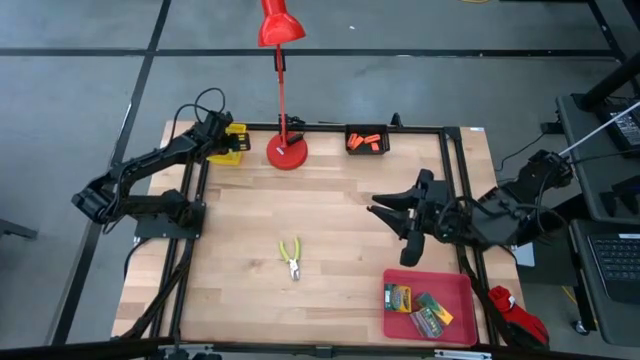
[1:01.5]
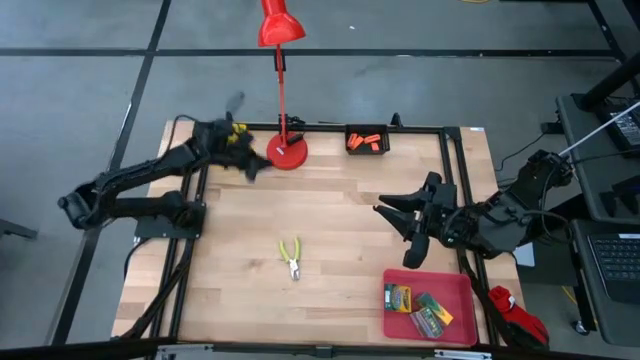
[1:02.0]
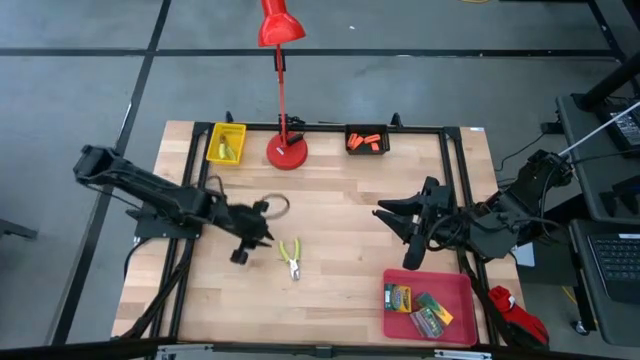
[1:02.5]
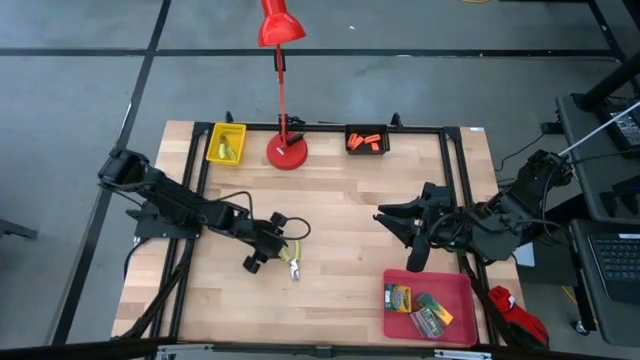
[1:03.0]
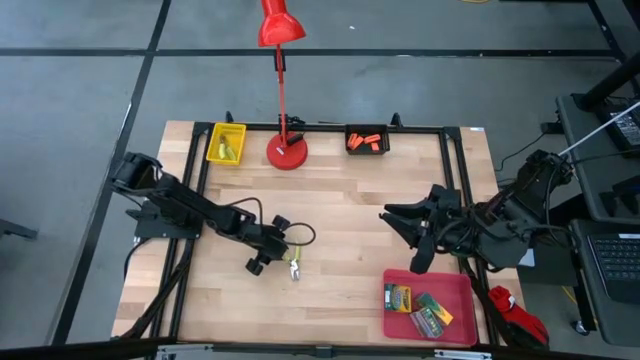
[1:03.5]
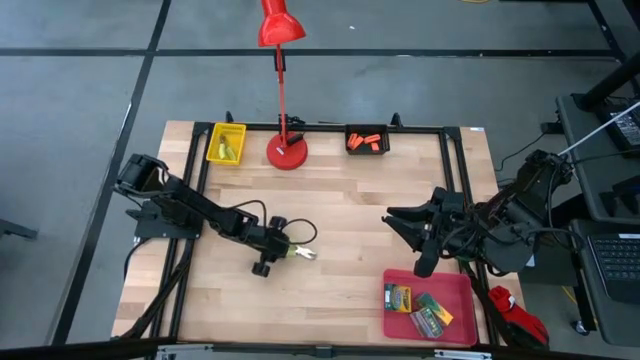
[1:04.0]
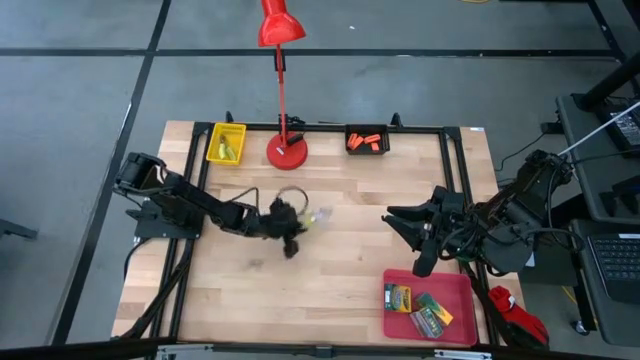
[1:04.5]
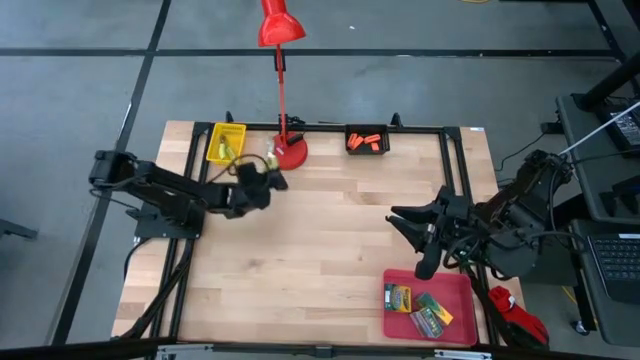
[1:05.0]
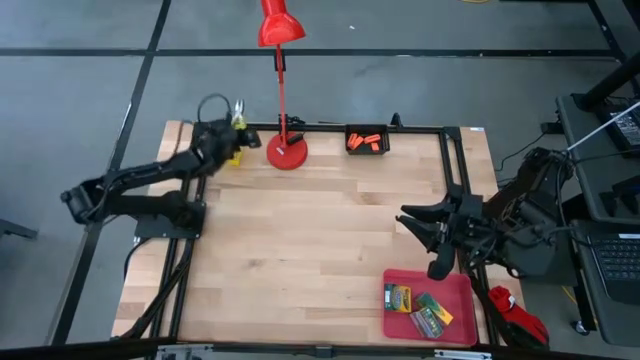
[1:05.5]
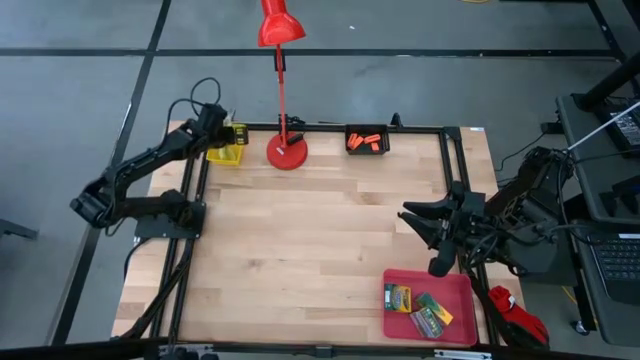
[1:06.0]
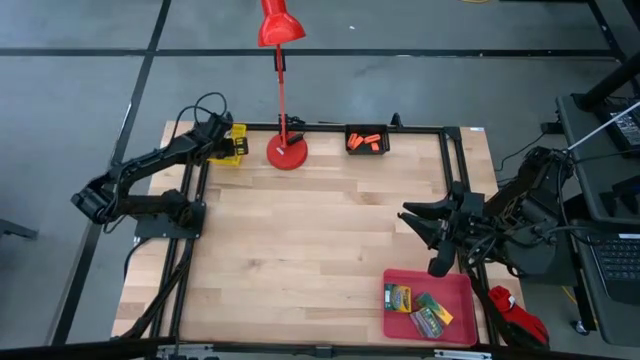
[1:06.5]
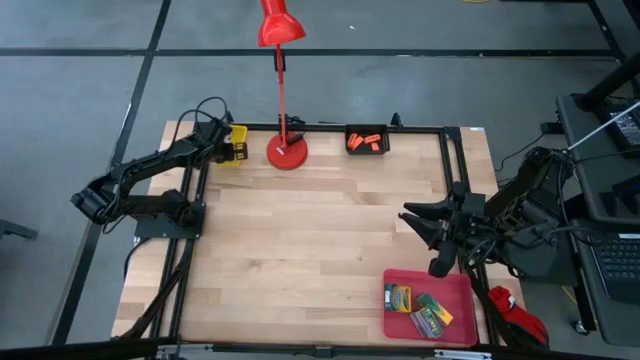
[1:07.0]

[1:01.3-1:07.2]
Task: Pick & Place School Supplies
Put the green hole punch into the yellow bin

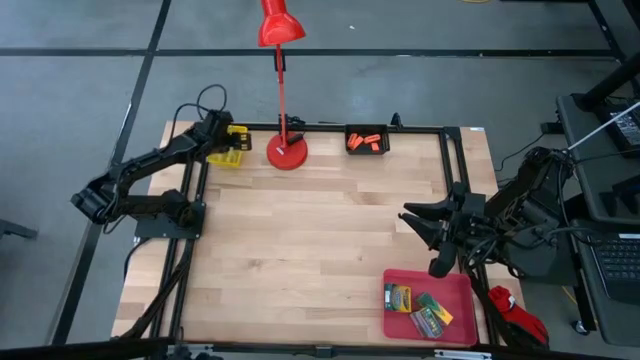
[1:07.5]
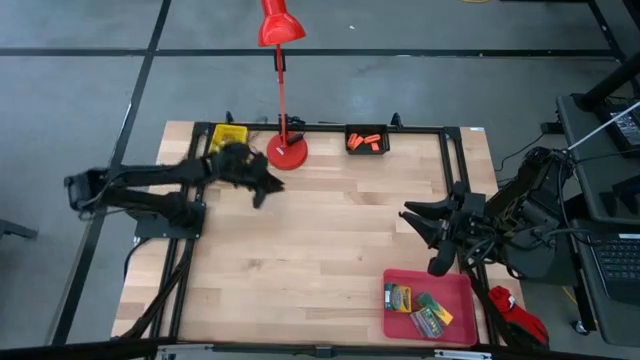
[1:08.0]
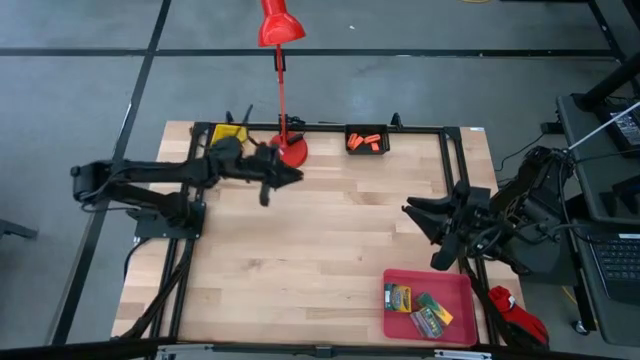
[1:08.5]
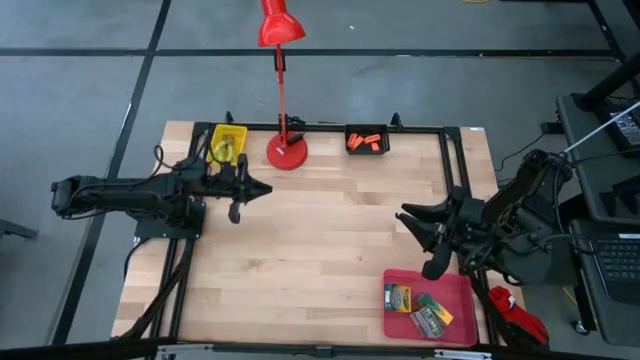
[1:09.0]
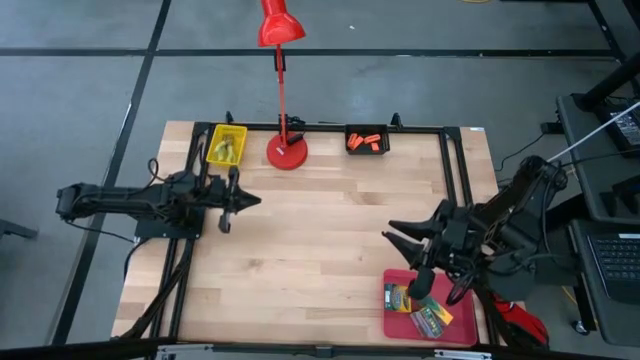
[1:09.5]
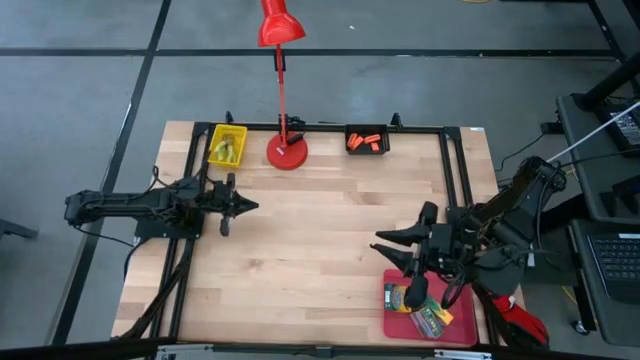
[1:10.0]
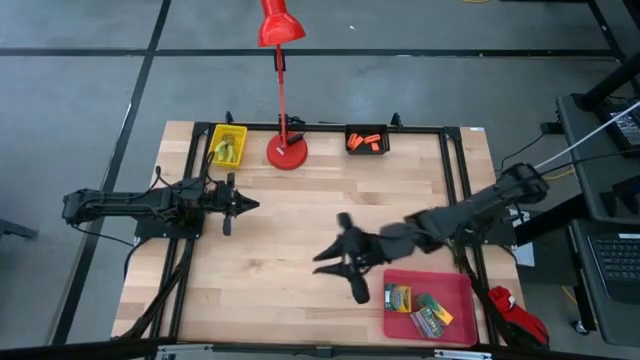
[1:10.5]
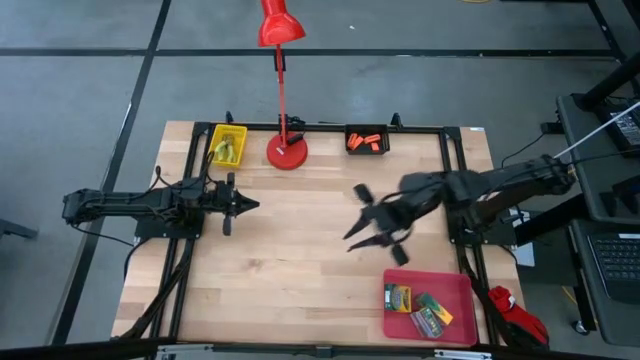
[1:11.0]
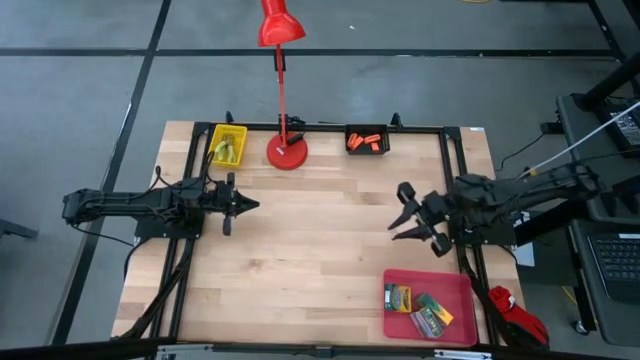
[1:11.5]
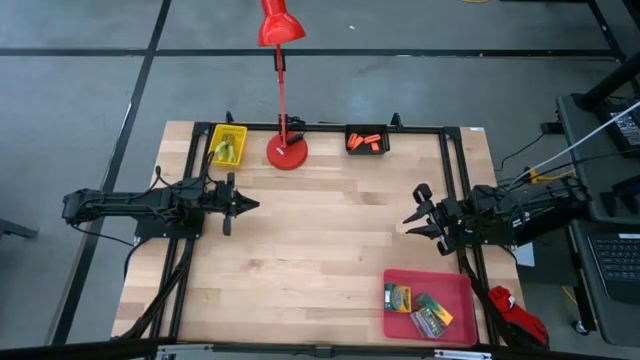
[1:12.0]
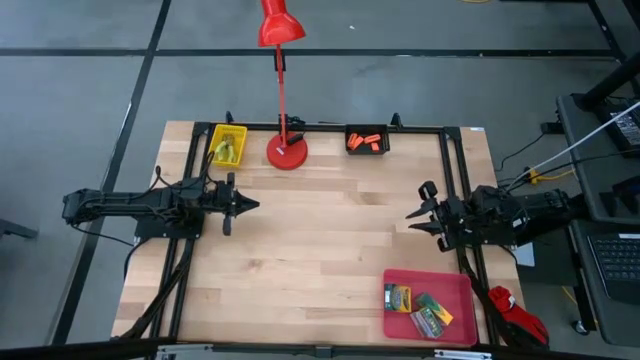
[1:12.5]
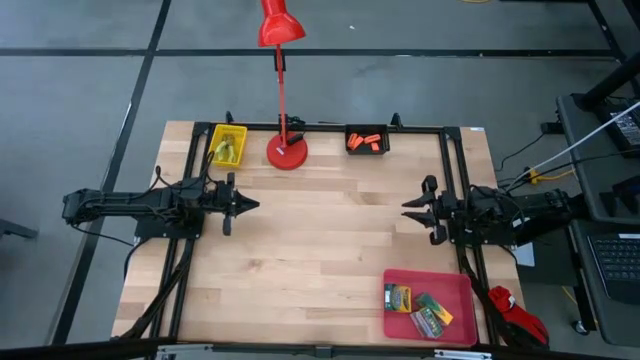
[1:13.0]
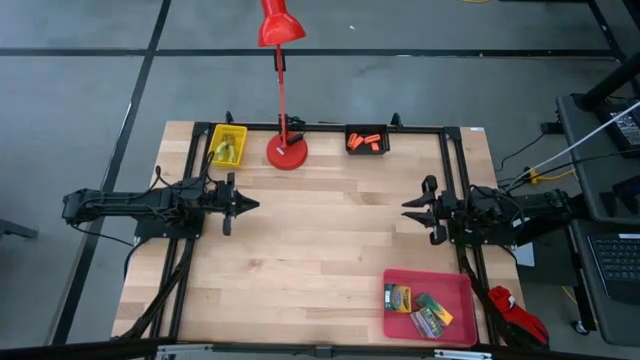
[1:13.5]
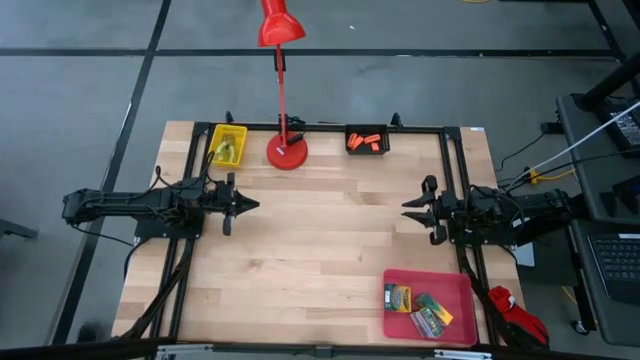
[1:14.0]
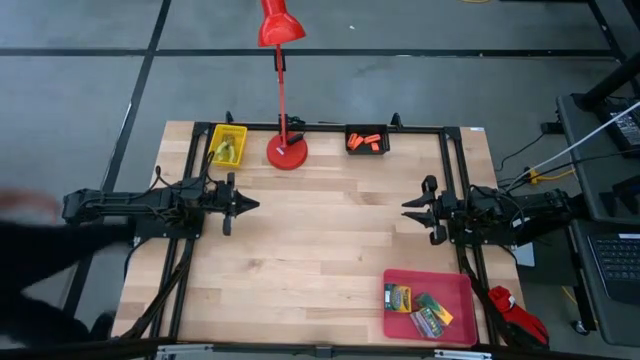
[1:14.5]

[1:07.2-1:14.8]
Return to Home Position

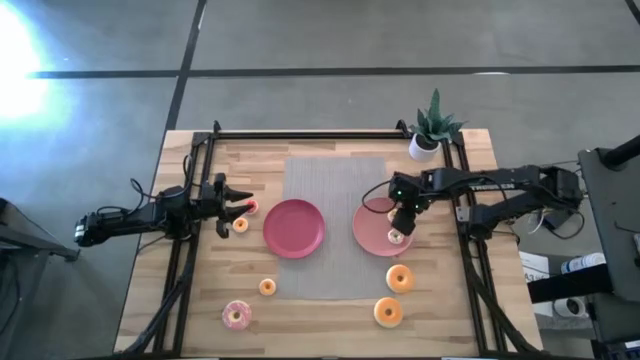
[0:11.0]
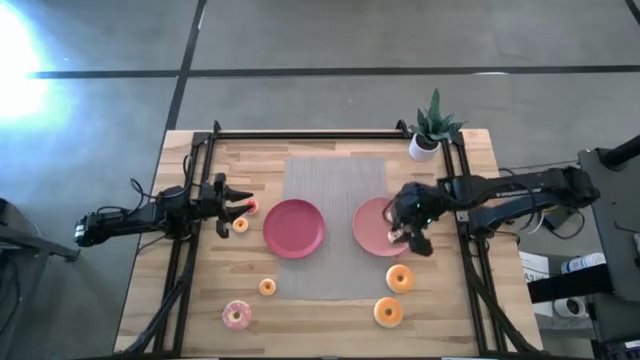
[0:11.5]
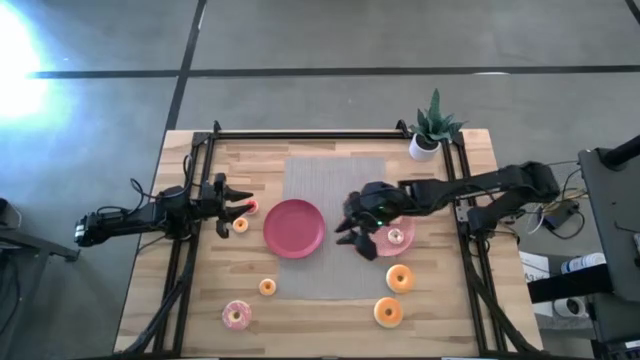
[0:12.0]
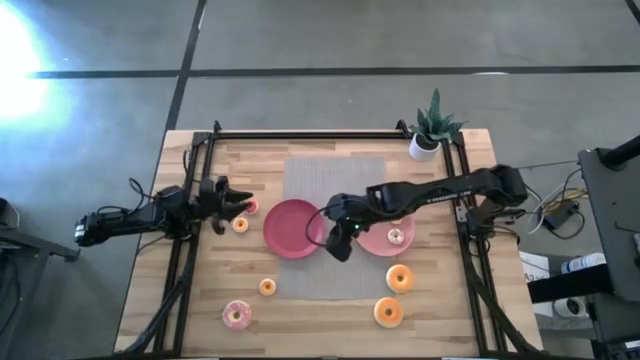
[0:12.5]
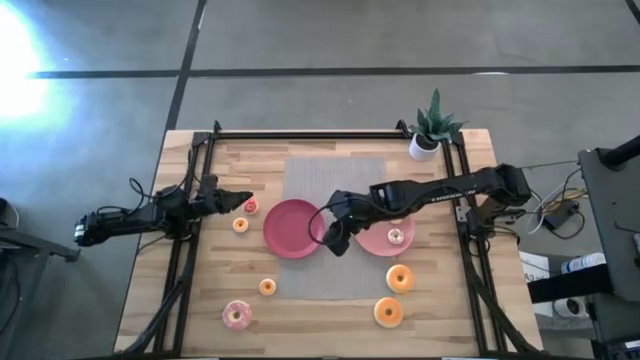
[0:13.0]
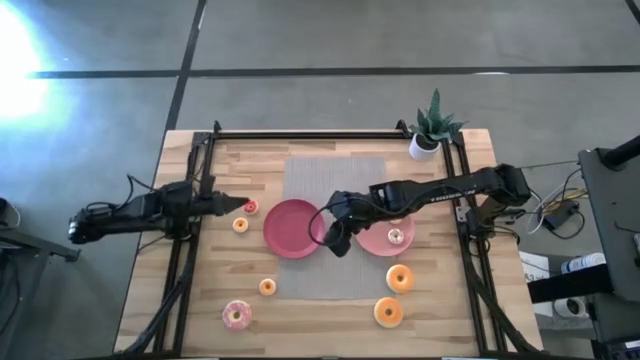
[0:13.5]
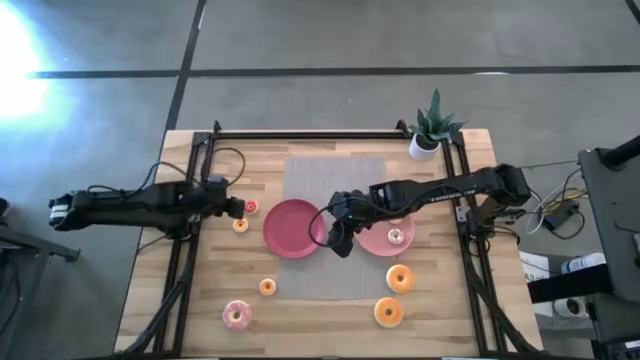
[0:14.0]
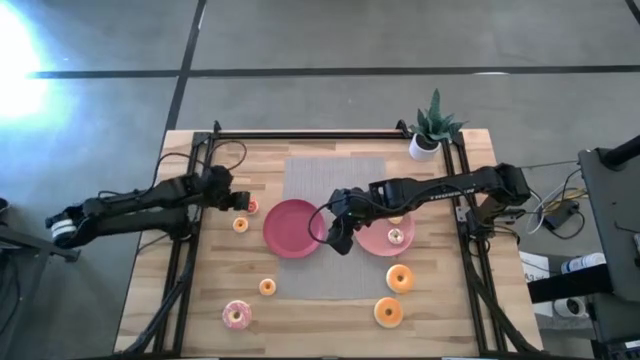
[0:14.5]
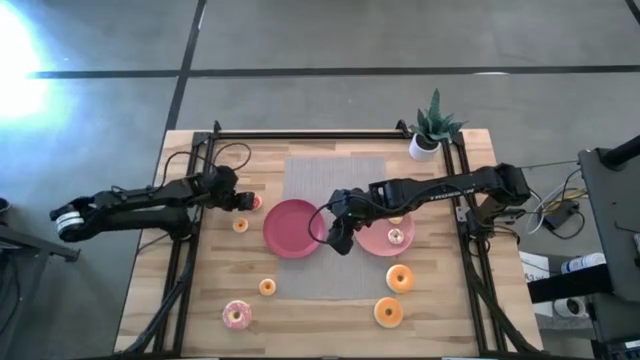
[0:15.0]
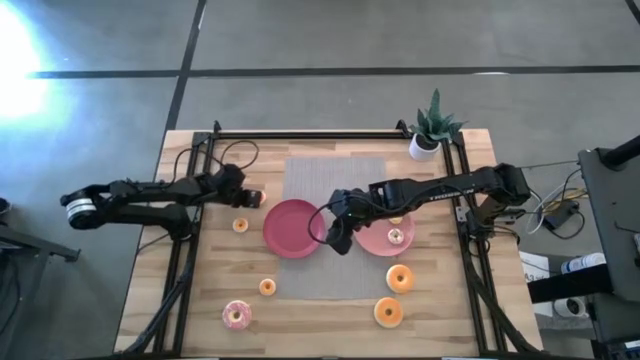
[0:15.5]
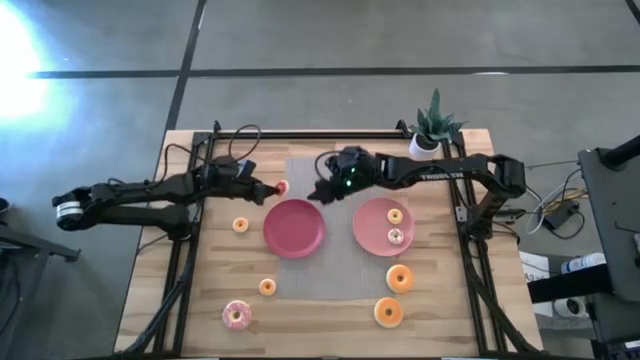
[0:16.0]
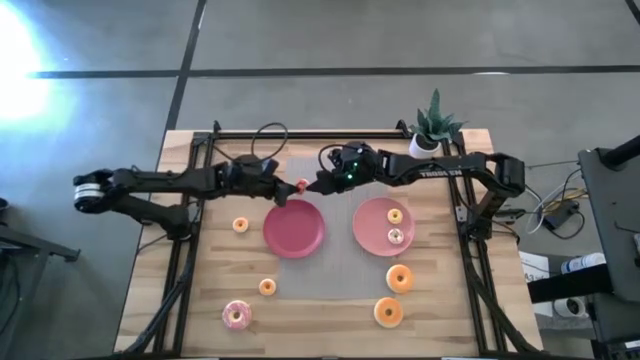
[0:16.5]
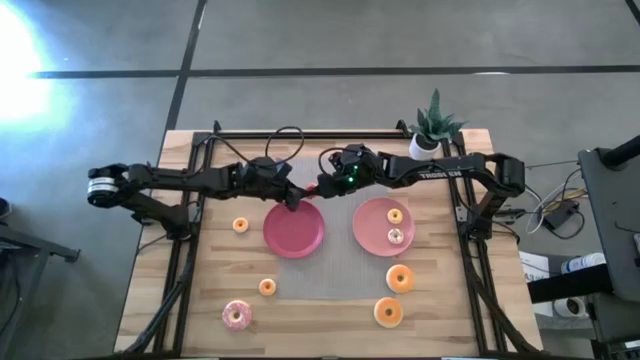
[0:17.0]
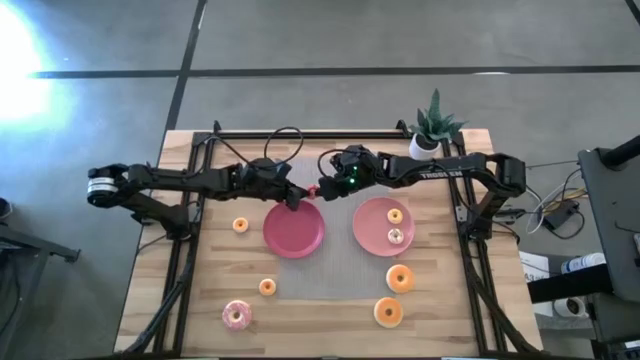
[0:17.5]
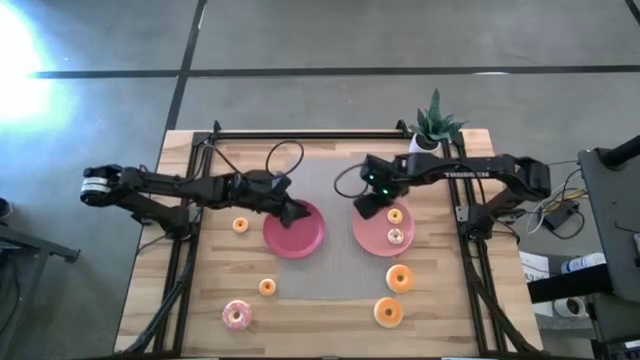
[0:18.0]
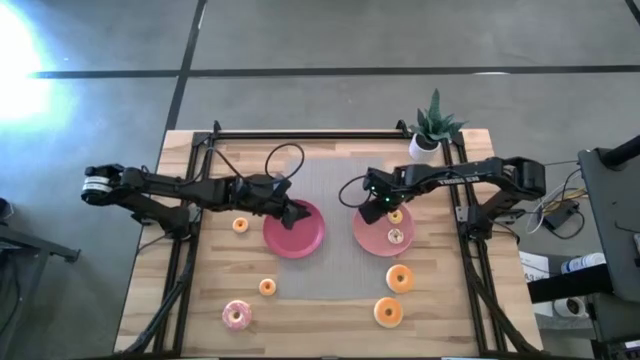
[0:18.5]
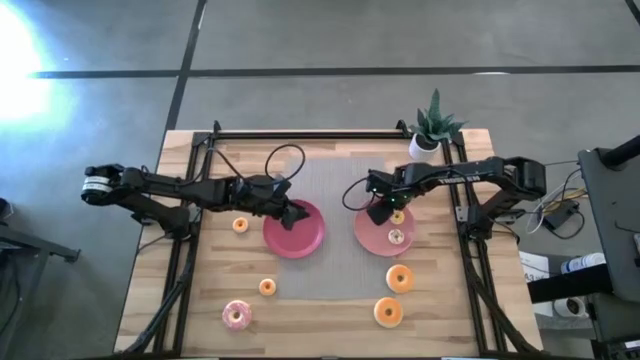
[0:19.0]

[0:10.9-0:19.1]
Task: Pick & Place donuts
Put the small red donut on the light pink plate
